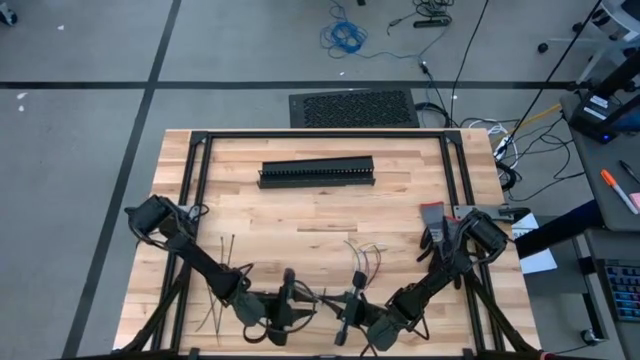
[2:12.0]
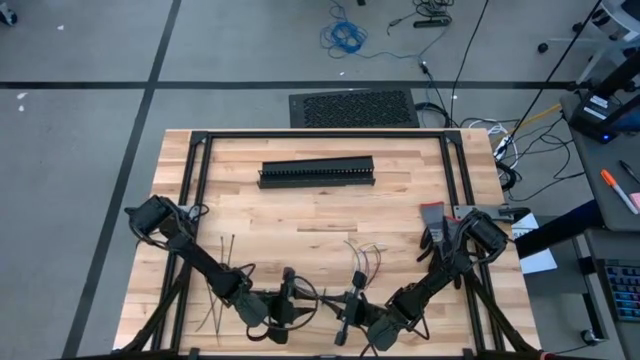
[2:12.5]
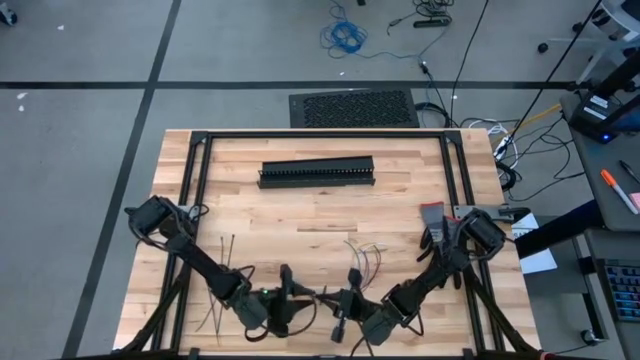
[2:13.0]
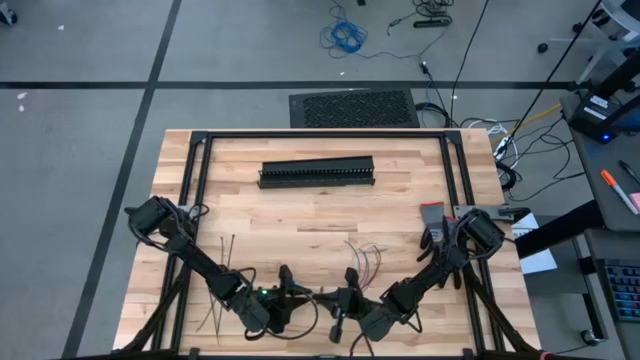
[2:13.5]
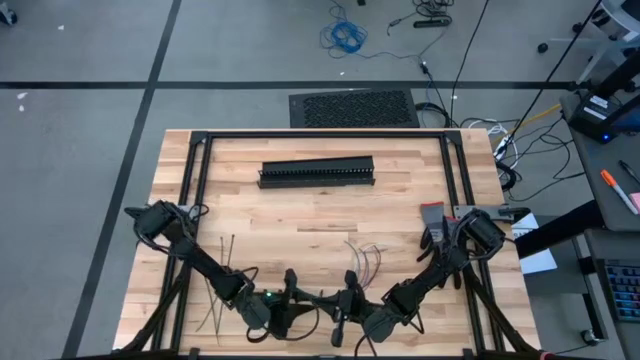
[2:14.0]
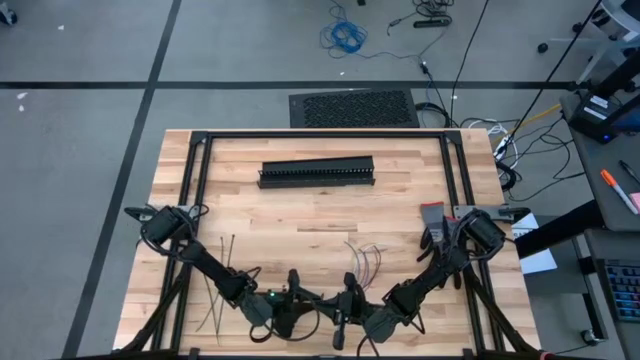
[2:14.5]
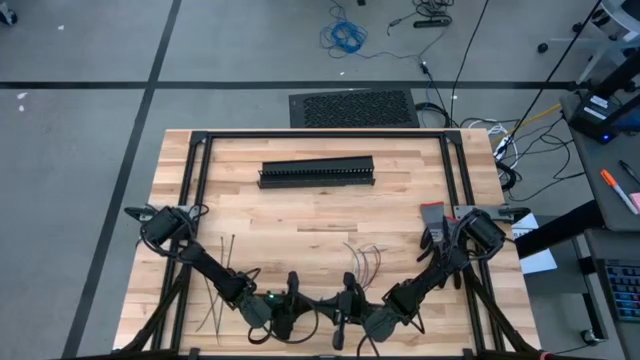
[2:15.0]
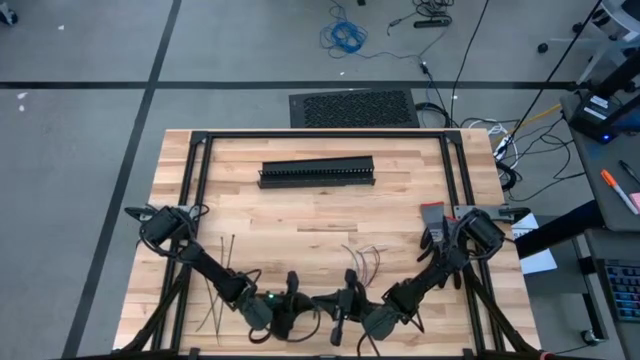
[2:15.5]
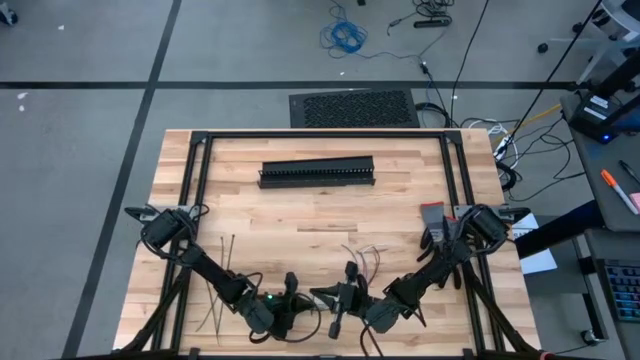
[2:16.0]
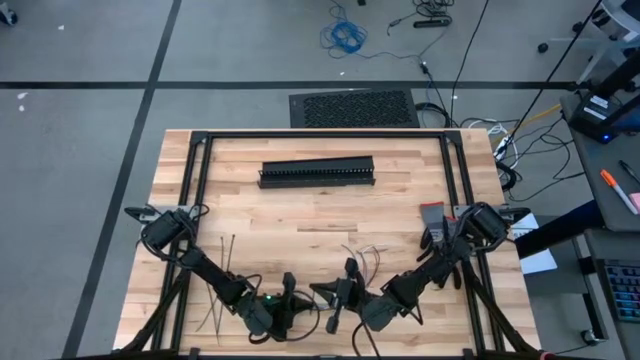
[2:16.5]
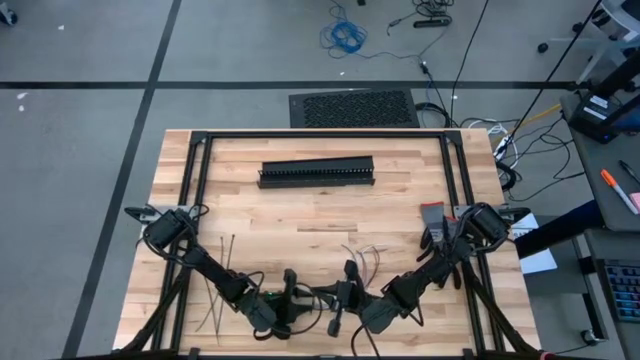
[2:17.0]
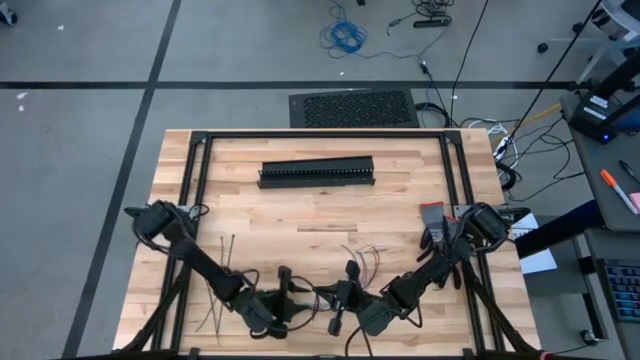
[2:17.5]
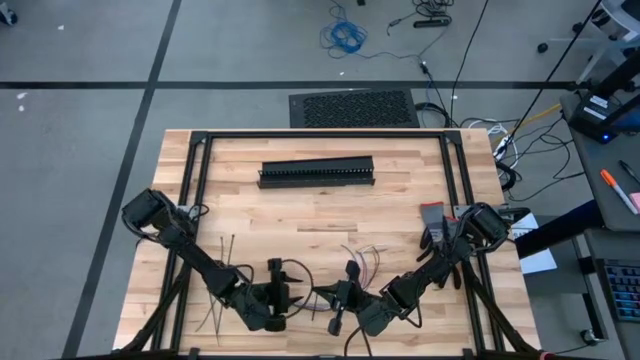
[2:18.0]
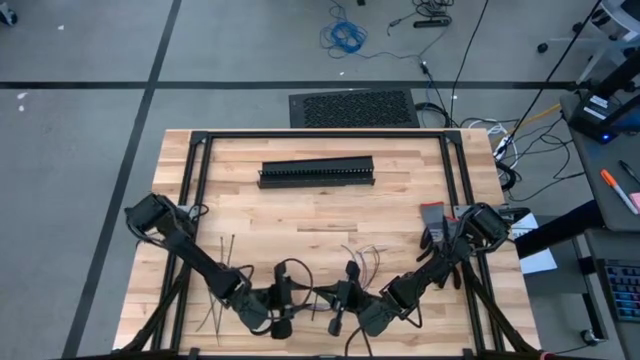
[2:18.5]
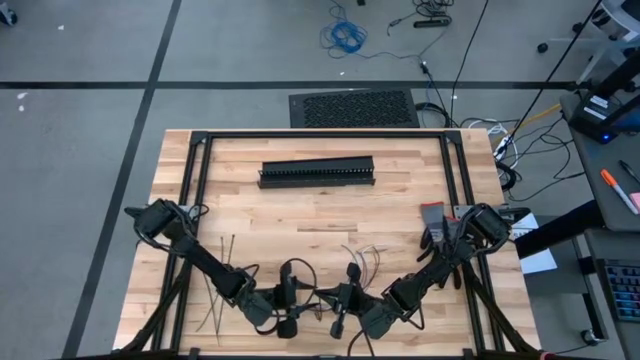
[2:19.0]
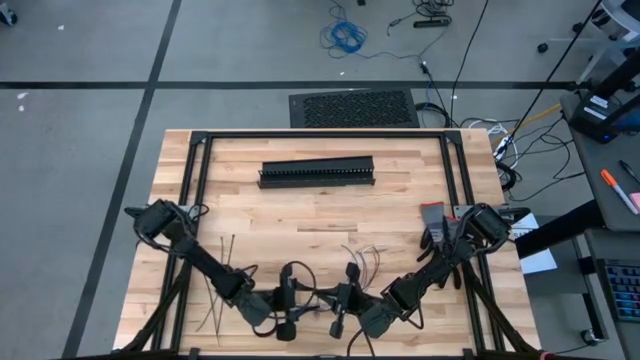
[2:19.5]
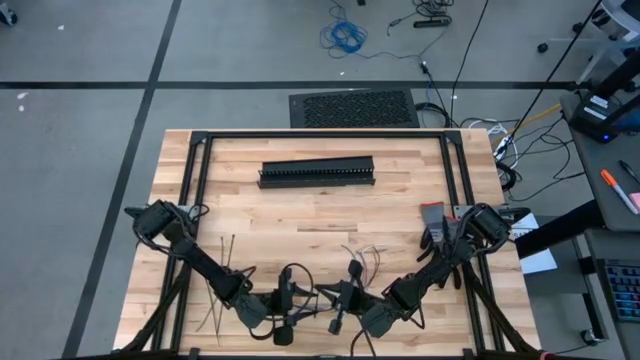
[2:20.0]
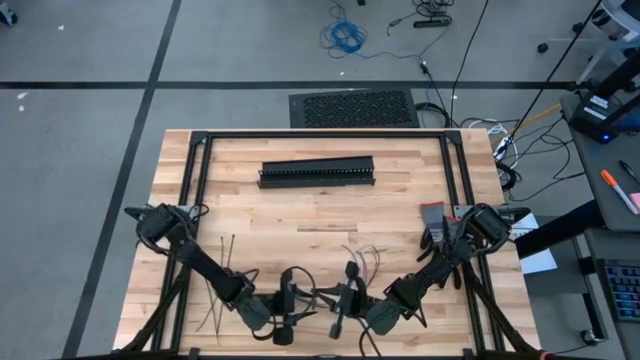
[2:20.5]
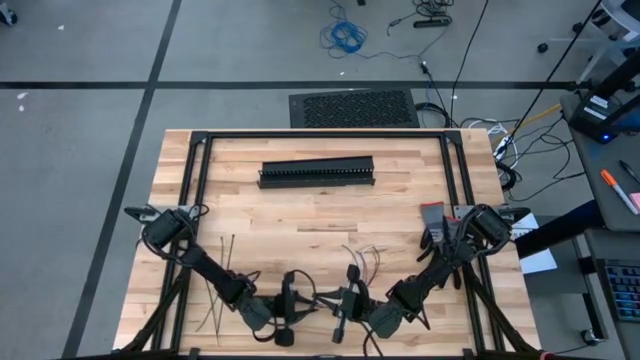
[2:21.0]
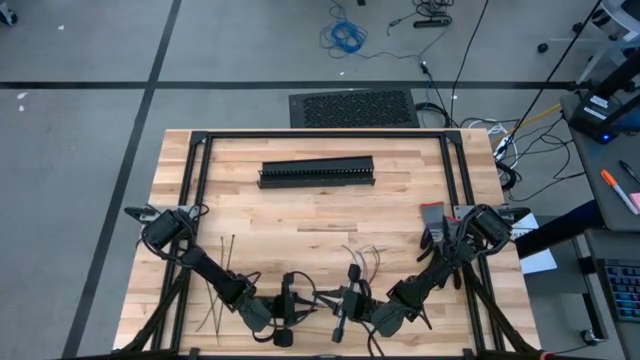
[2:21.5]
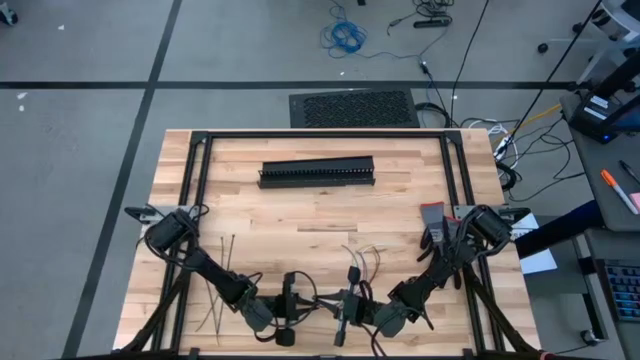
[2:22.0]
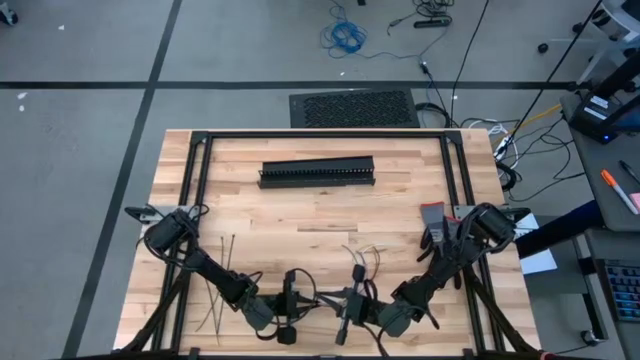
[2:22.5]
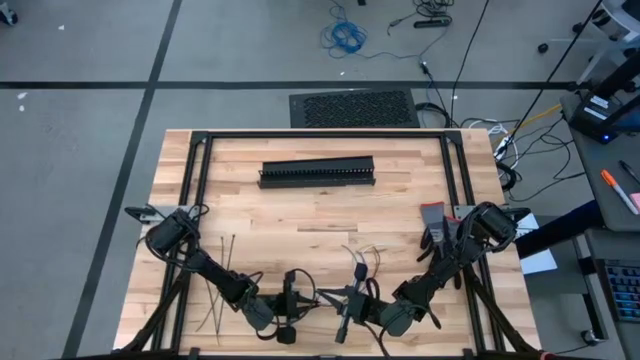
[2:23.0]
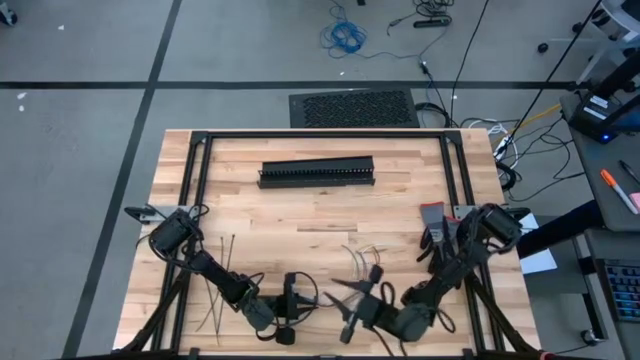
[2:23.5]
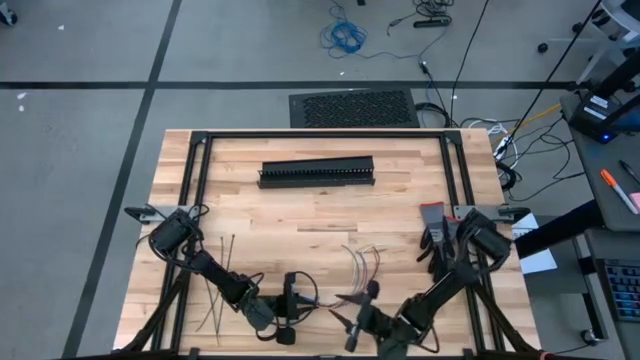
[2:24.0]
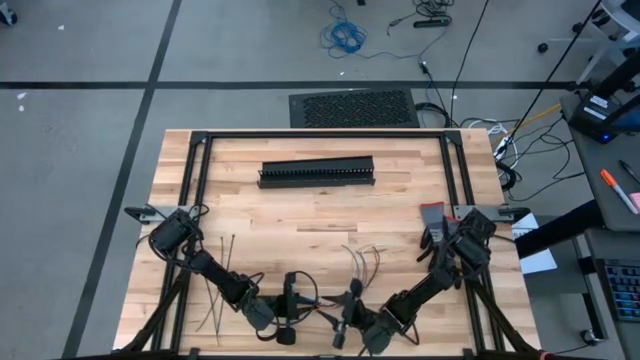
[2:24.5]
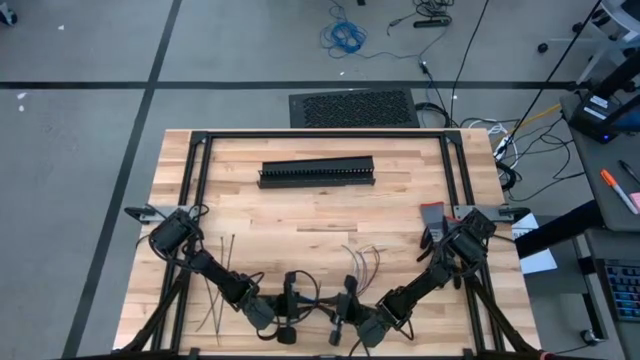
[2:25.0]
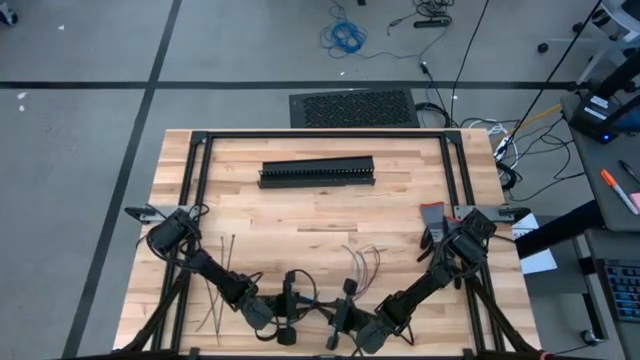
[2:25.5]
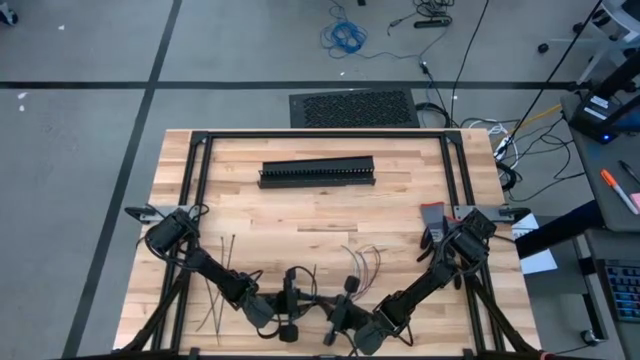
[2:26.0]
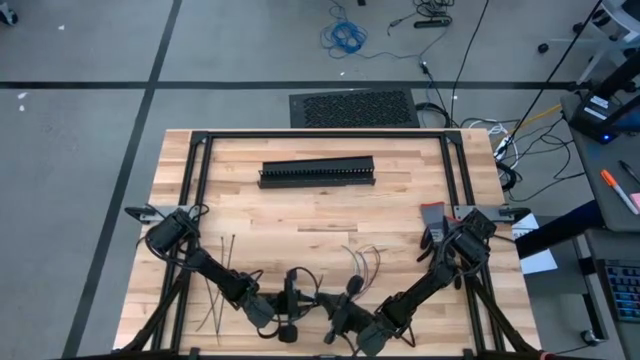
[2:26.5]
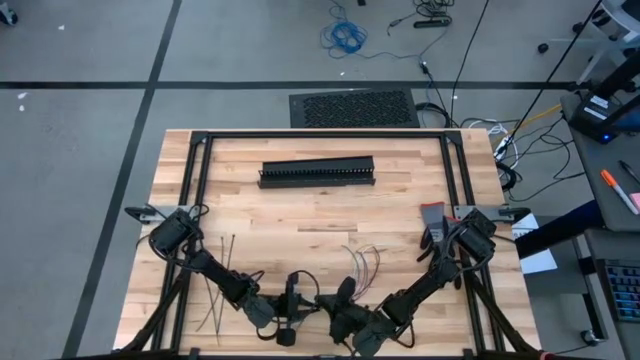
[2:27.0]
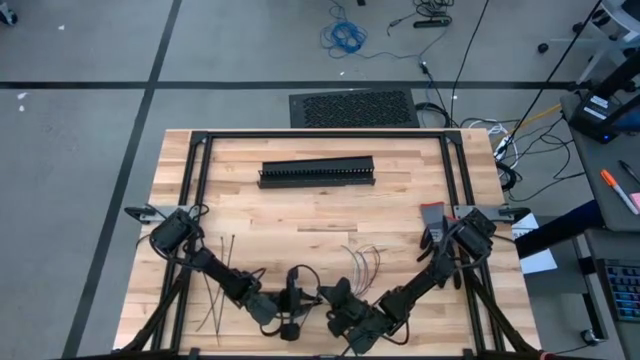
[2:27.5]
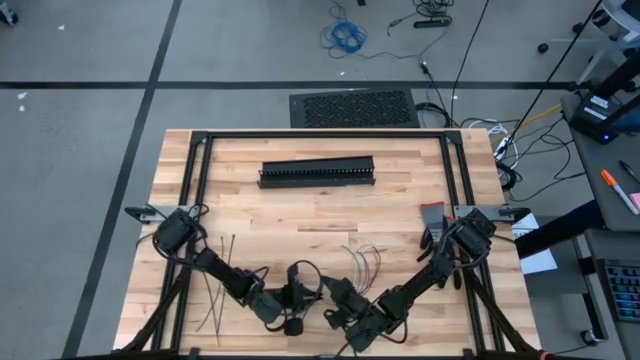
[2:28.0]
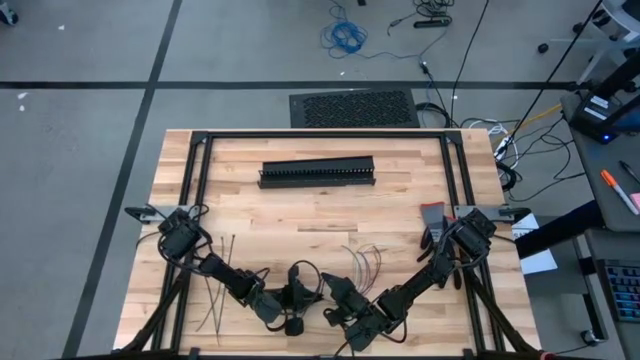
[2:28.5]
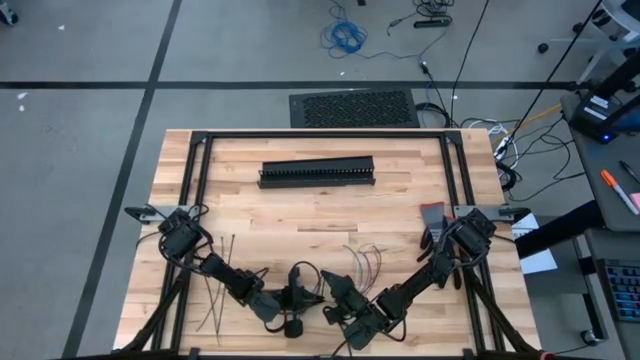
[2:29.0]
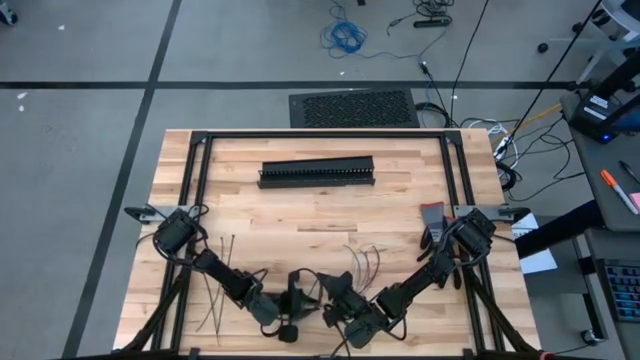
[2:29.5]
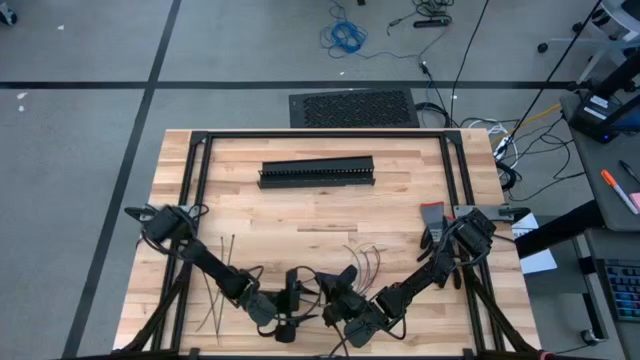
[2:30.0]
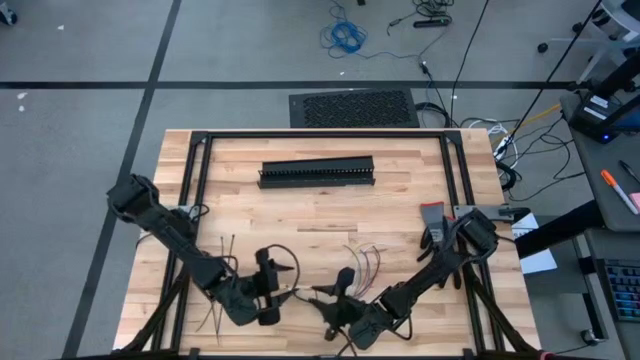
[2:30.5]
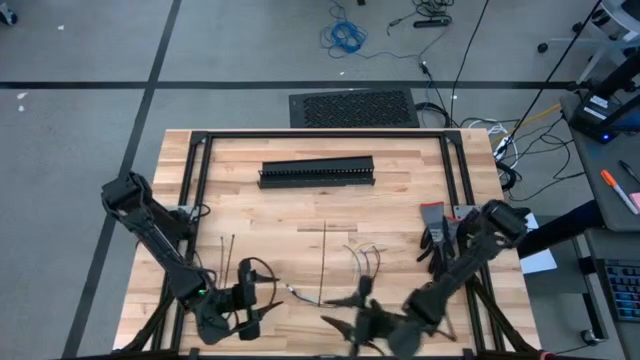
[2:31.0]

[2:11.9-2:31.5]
Task: Ziptie cables
Wrap the zip tie around the cable wires

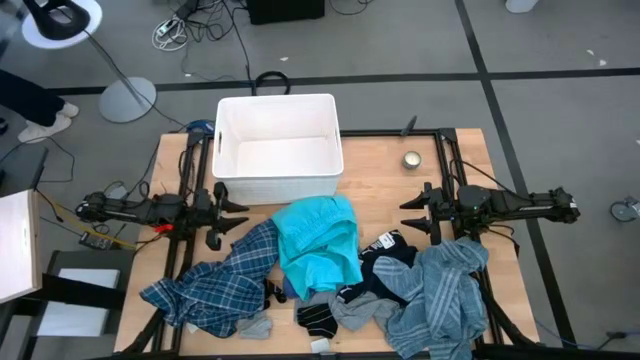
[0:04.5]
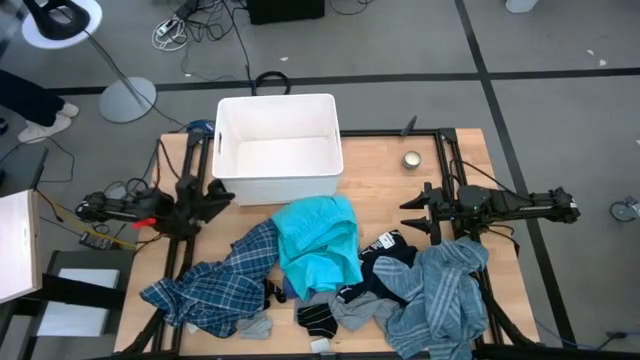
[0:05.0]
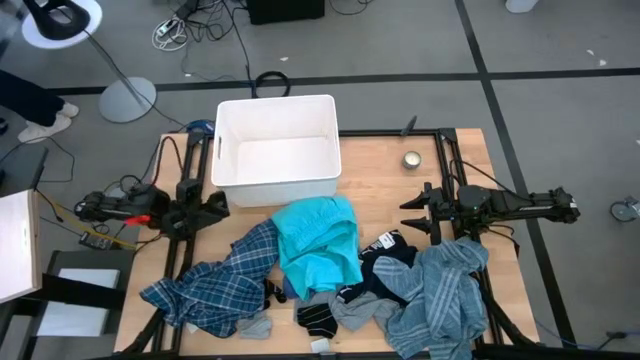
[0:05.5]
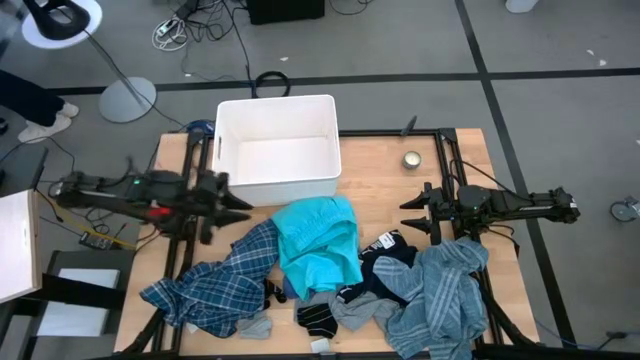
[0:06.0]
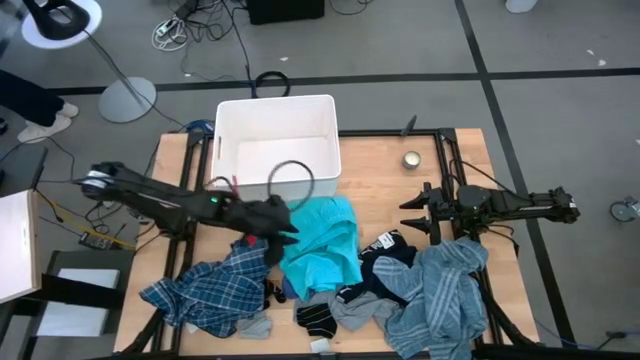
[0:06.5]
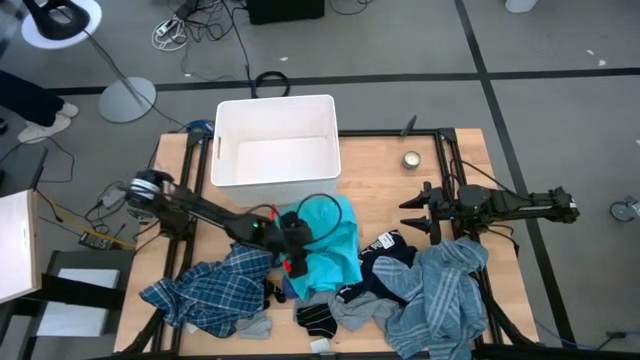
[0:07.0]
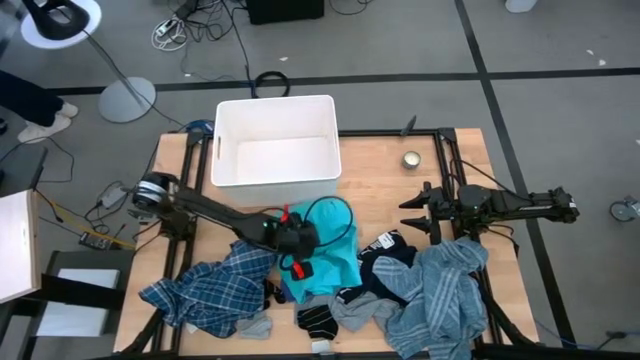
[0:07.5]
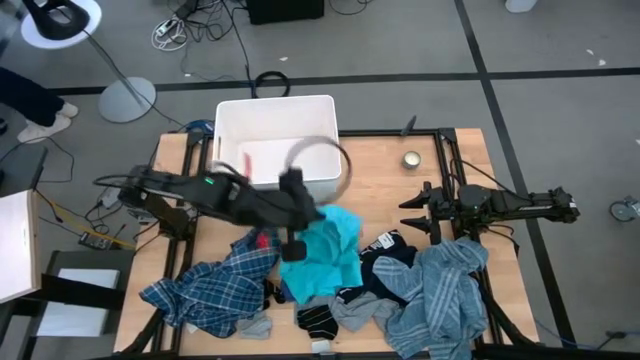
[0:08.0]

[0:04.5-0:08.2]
Task: Sort clothes
Put the light blue shorts into the white laundry bin
